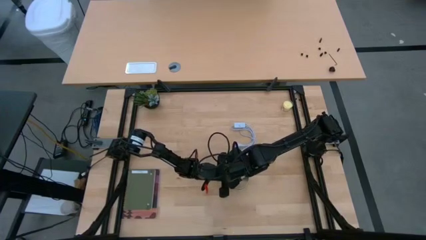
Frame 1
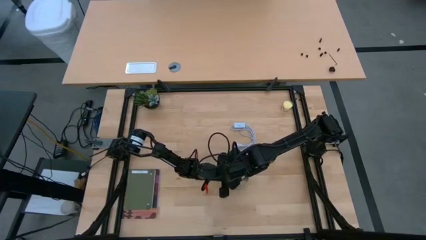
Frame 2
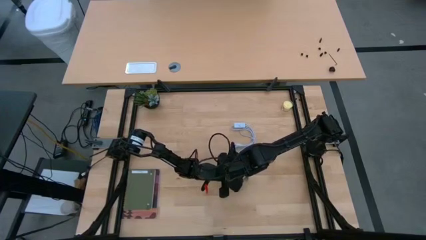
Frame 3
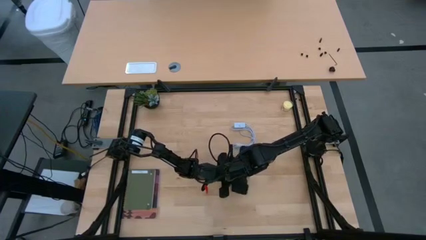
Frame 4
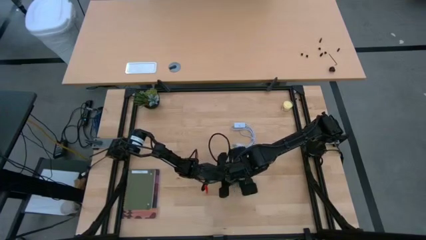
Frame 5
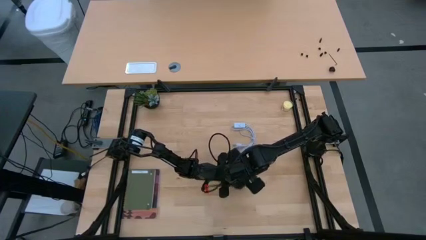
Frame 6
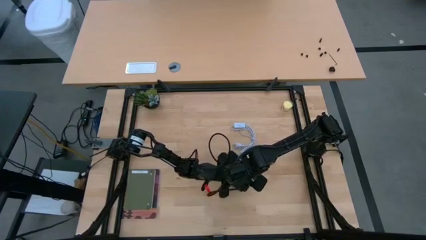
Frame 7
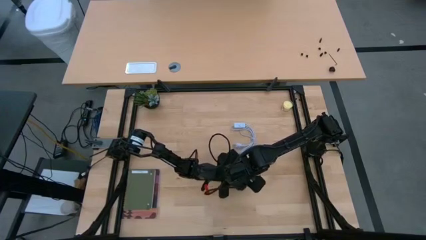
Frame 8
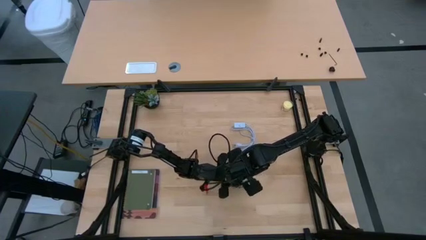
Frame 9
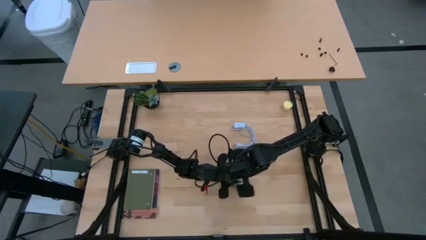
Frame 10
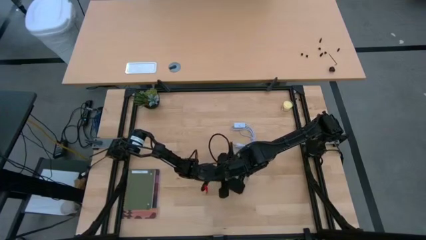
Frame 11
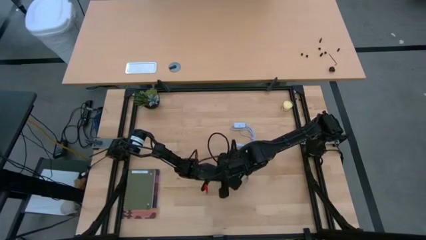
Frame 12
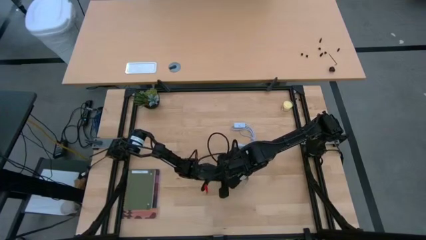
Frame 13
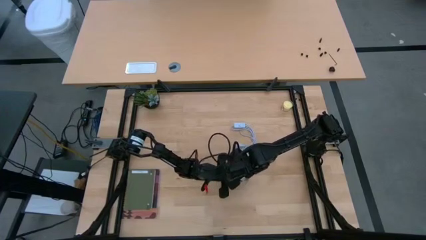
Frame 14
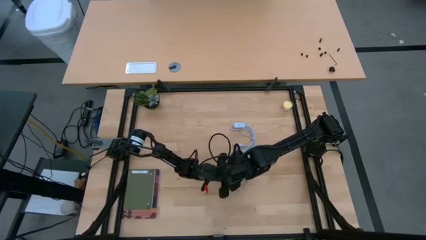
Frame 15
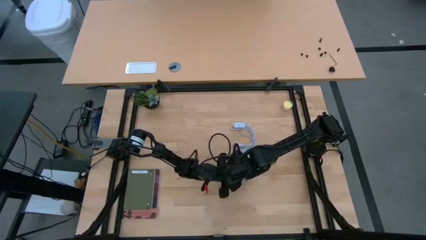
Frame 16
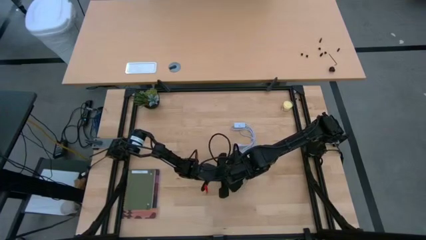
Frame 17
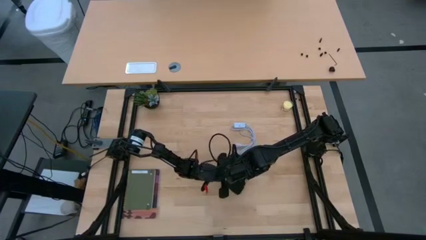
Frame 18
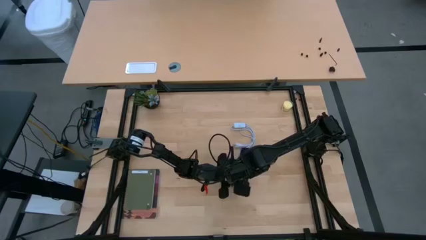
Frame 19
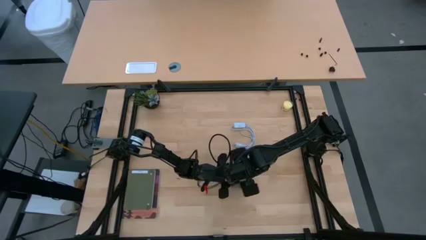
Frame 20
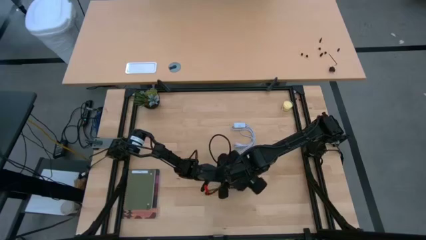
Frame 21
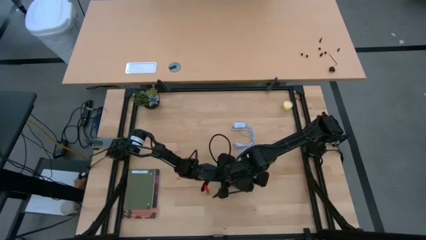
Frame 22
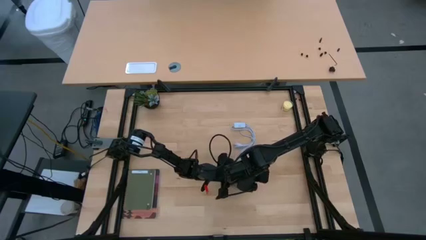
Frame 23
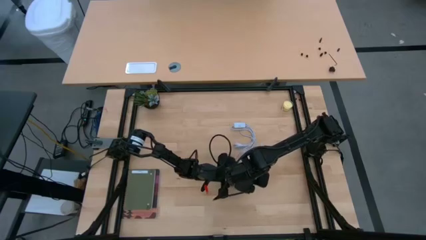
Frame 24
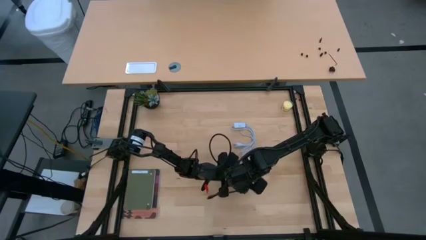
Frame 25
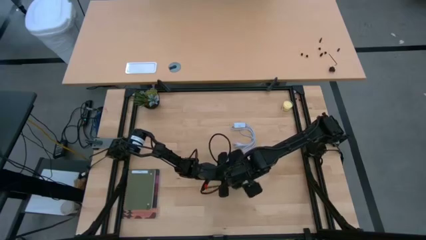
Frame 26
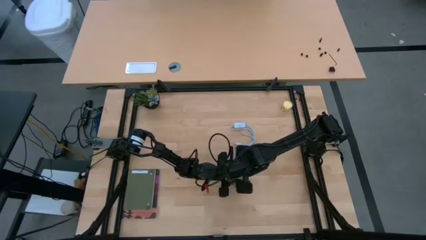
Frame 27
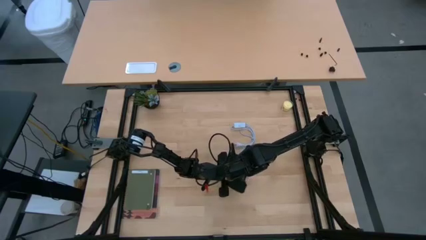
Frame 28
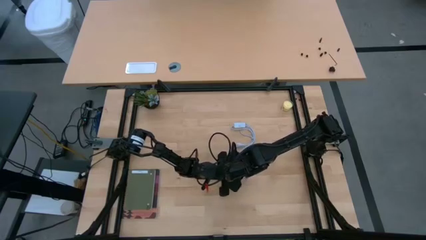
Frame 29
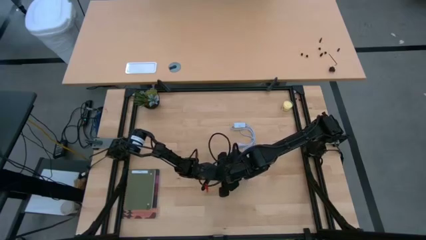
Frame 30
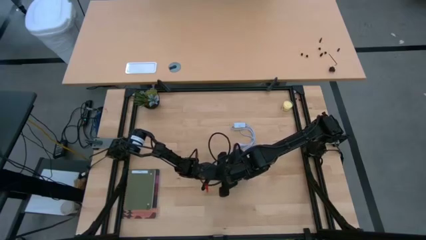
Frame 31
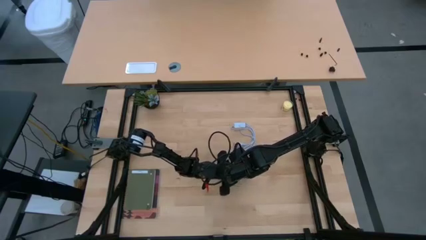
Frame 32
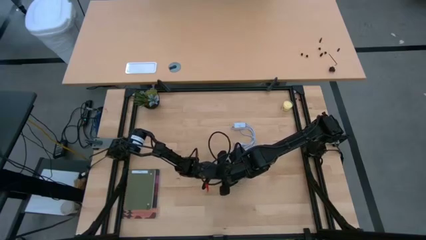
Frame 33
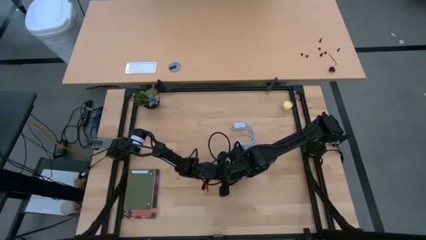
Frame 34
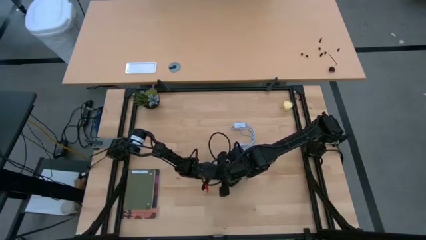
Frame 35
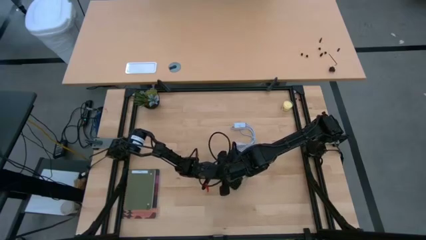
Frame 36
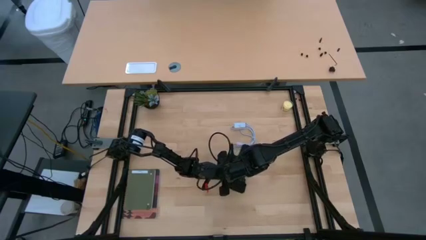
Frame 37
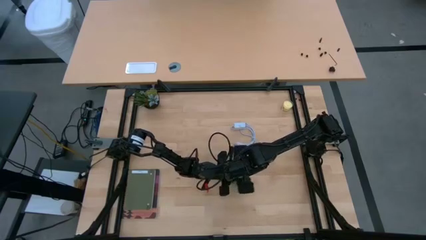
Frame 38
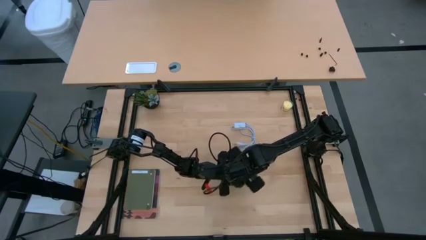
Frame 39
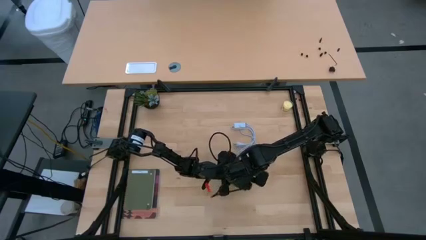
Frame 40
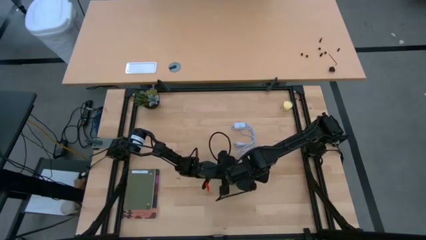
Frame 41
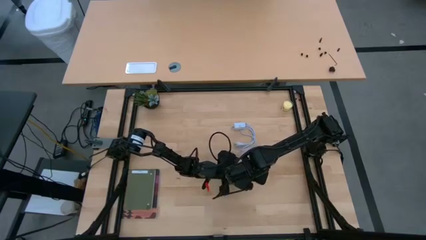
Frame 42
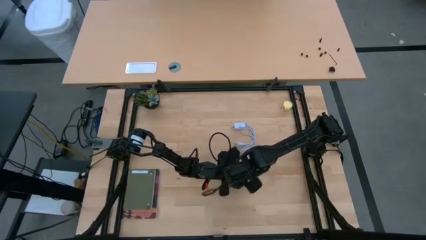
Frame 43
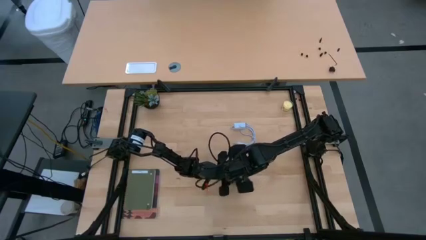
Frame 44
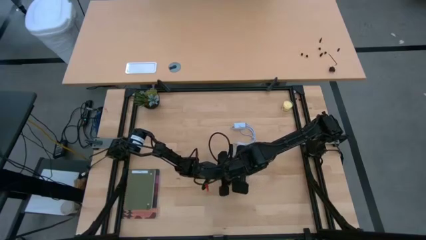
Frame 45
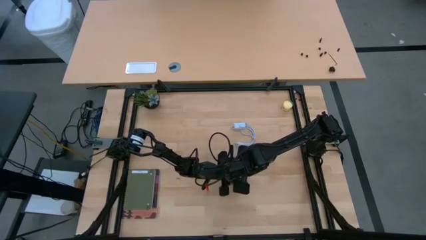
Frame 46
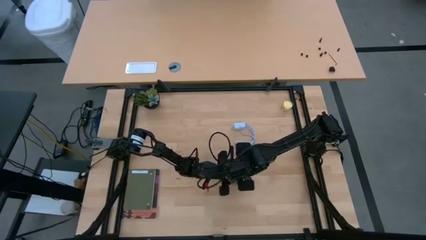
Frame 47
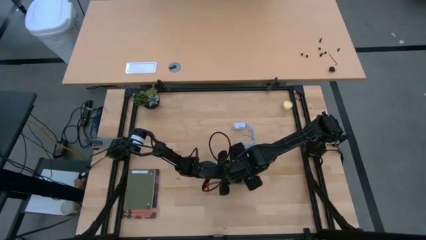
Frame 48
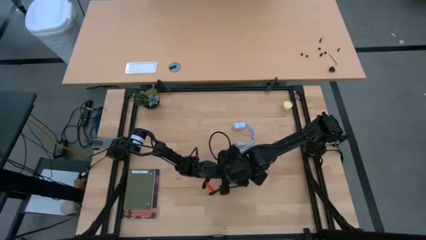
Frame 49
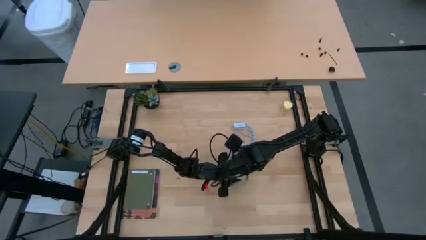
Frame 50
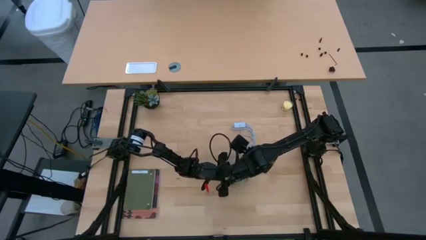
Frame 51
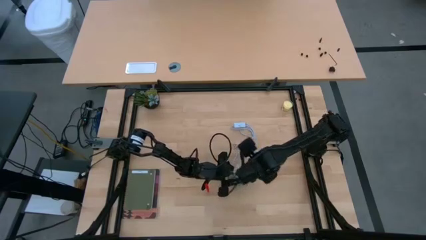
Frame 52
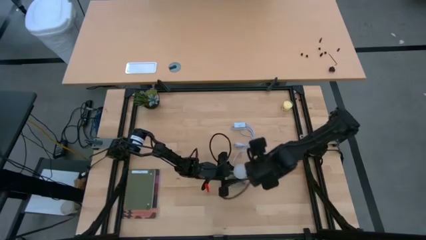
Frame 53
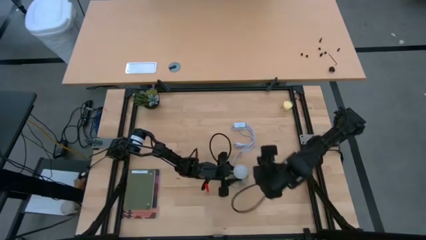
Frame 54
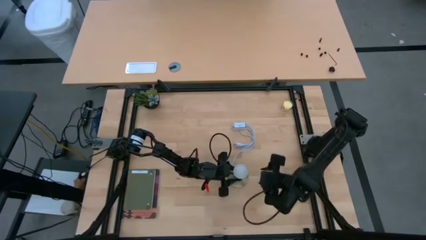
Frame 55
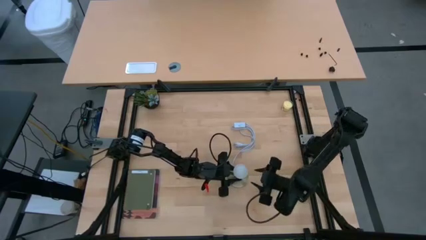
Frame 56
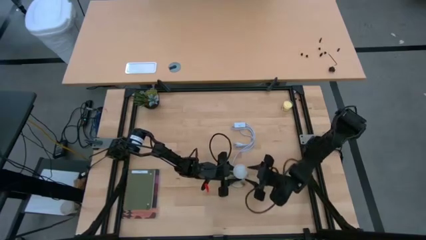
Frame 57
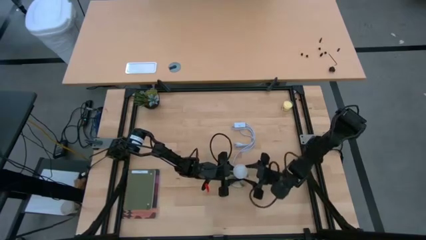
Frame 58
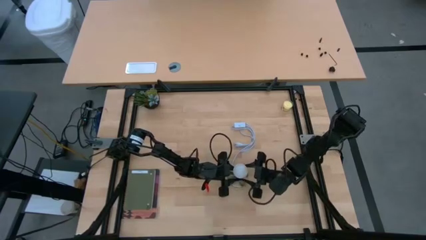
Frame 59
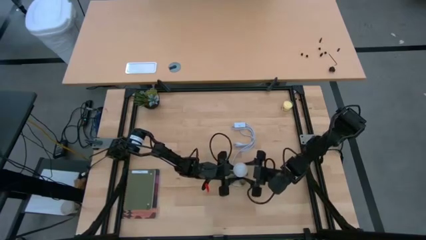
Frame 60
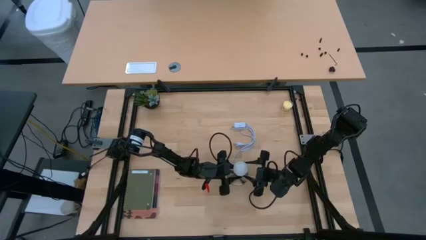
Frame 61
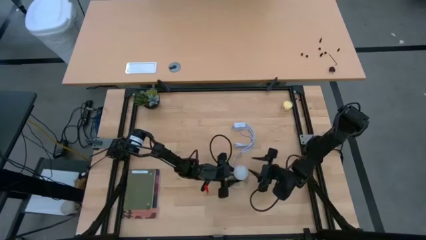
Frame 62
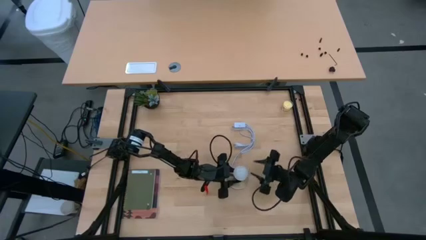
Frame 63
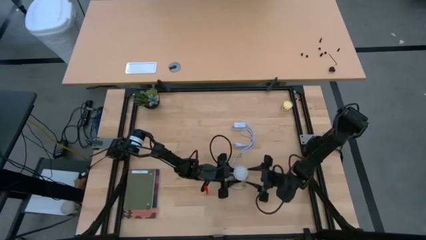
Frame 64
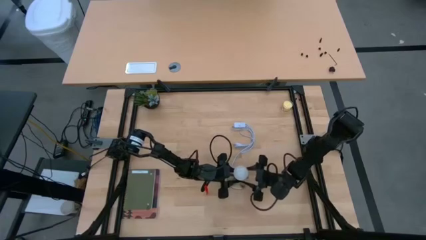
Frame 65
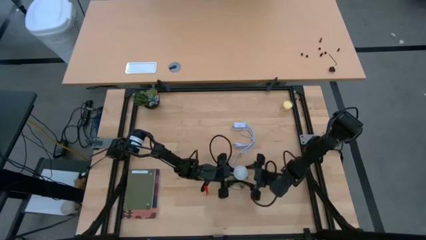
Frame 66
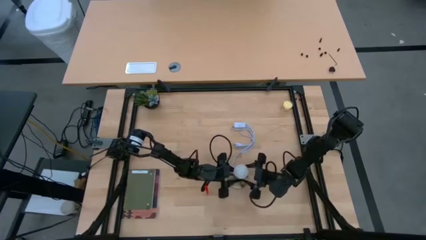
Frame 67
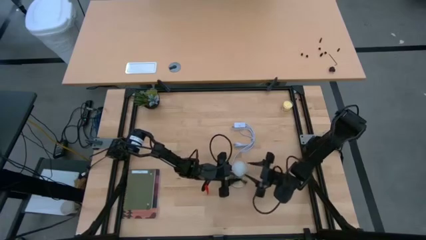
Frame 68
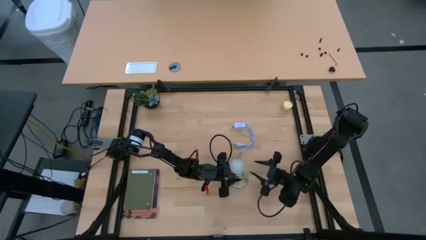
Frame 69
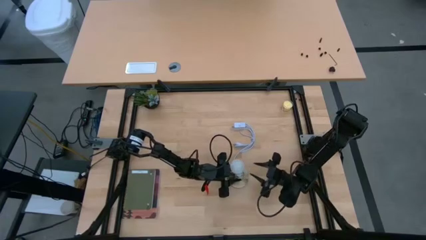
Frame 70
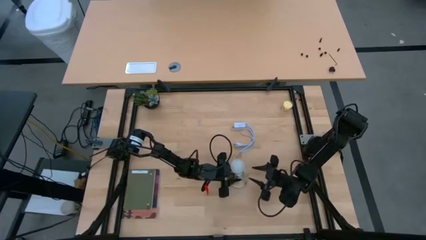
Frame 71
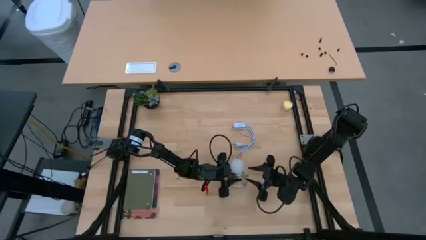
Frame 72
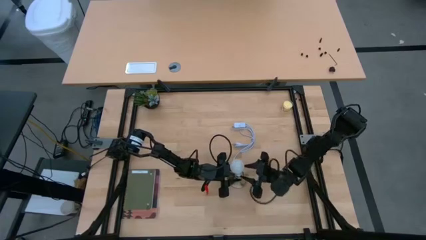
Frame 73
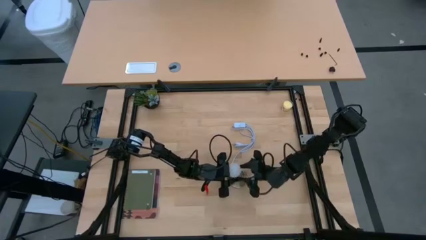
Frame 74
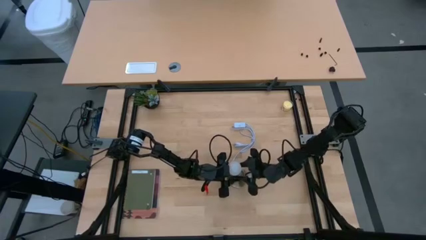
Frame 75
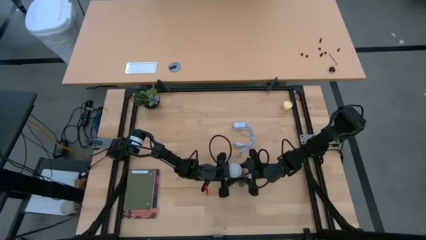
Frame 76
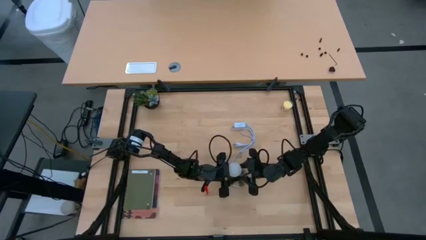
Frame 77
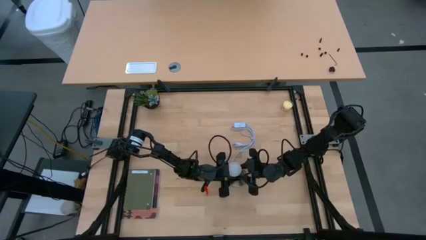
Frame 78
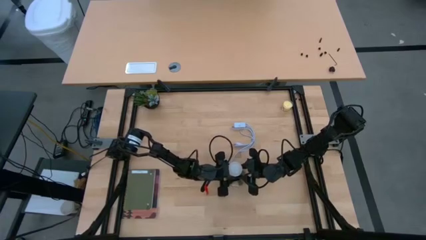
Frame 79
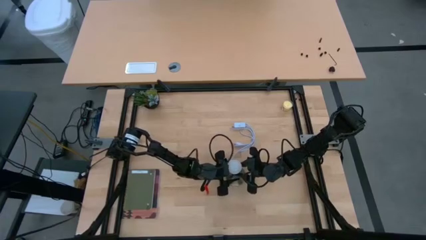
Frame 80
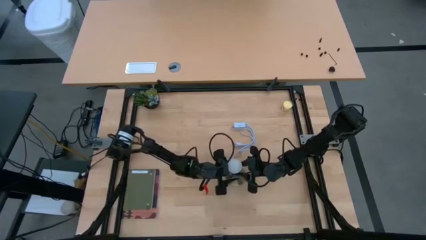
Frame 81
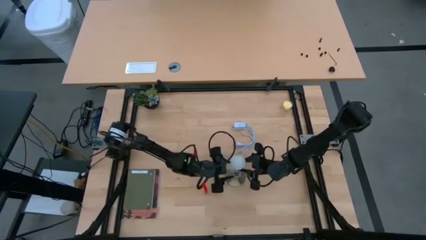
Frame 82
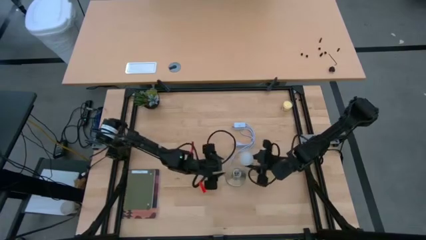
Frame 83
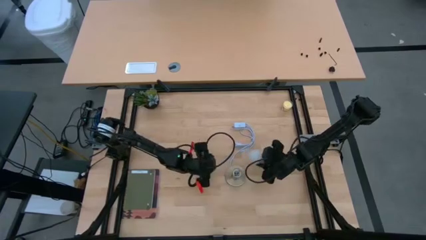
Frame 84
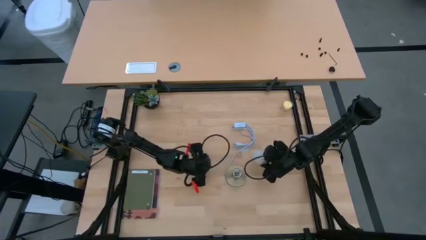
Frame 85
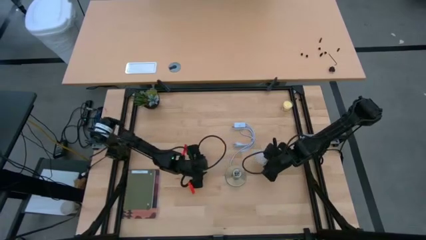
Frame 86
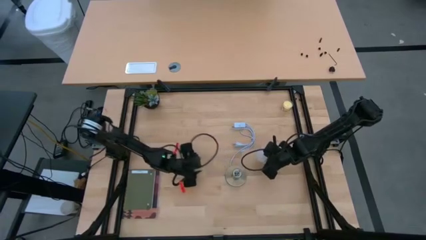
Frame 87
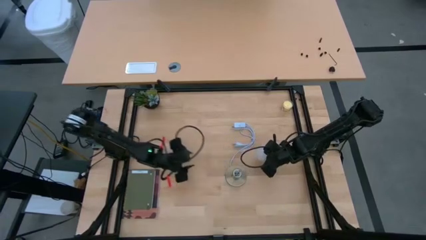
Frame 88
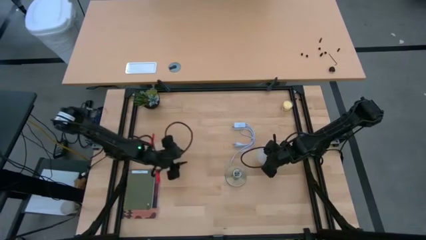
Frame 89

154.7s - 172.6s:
Task: Screw lightbulb
Remove the lightbulb from the lamp
